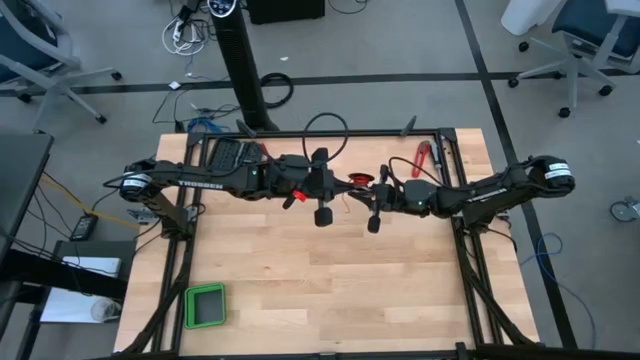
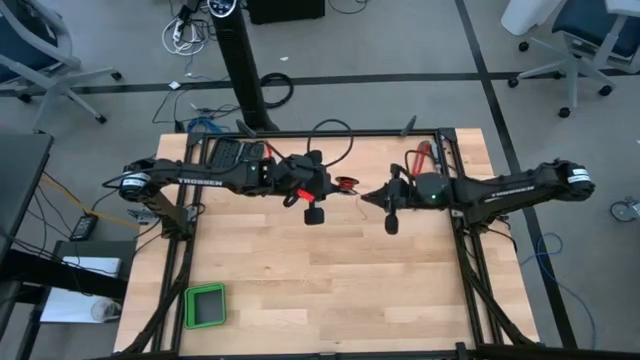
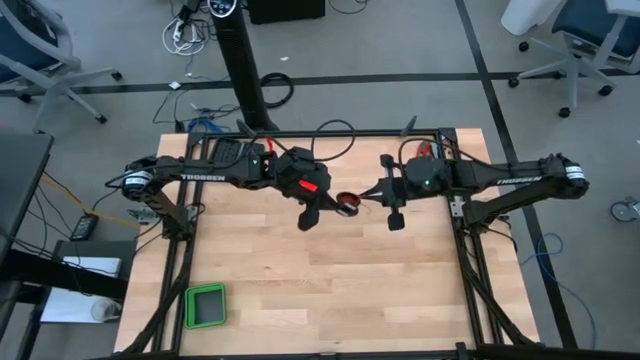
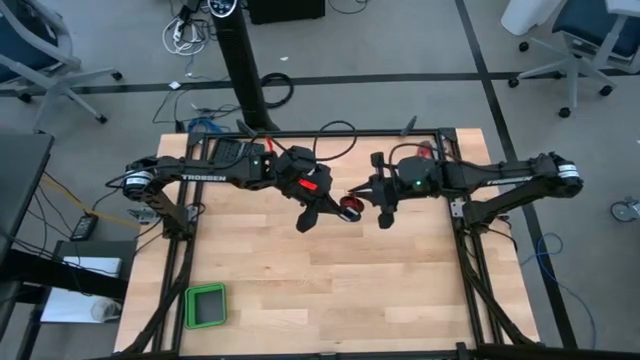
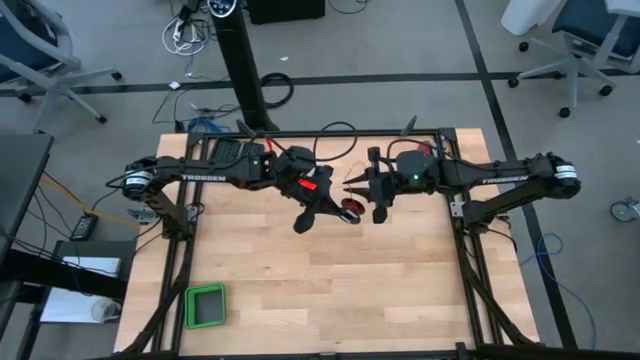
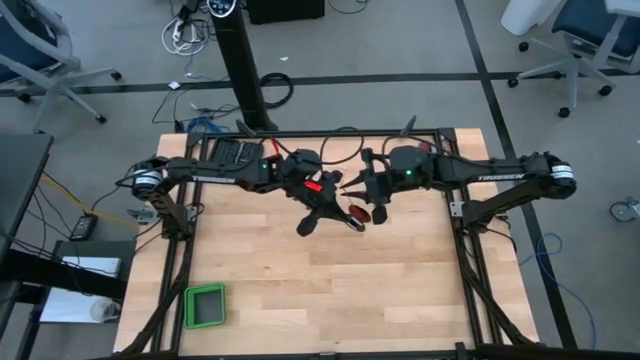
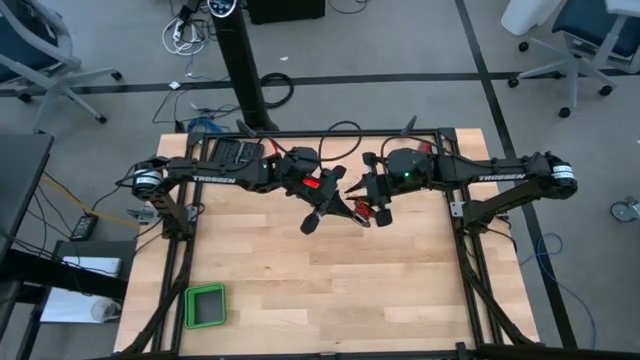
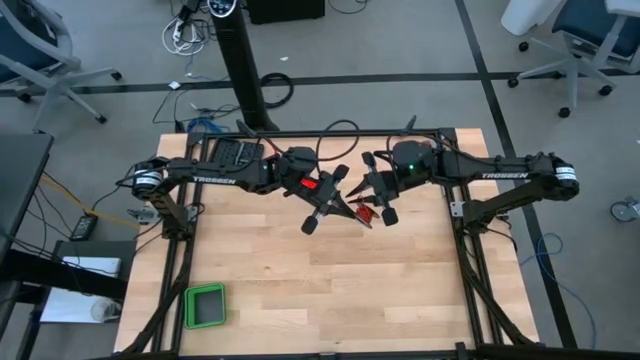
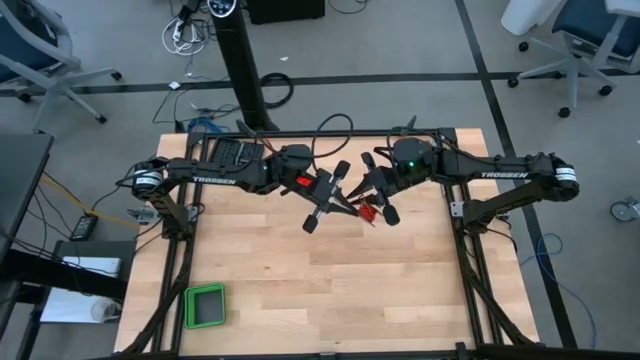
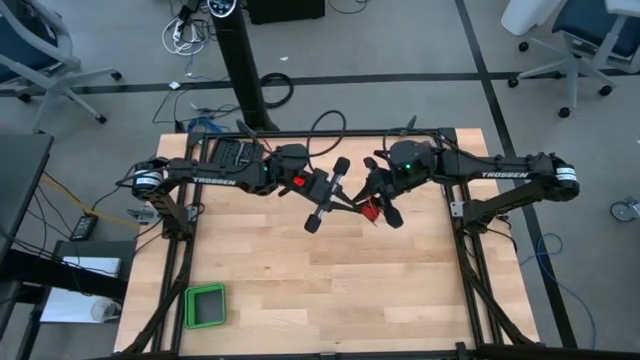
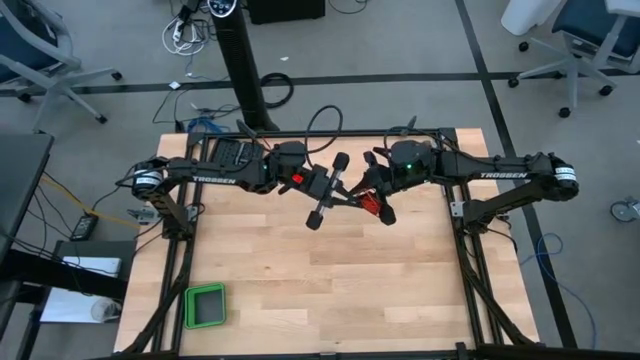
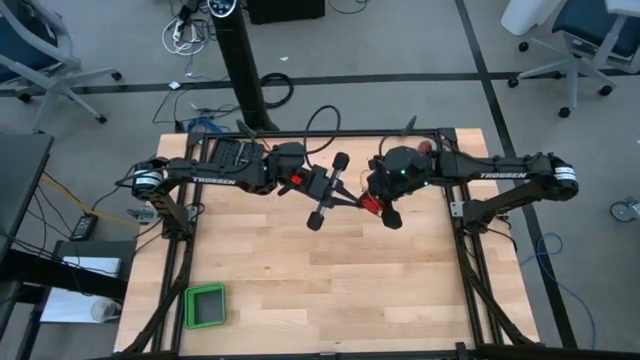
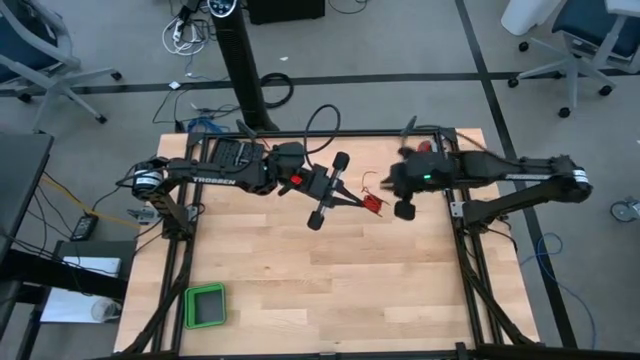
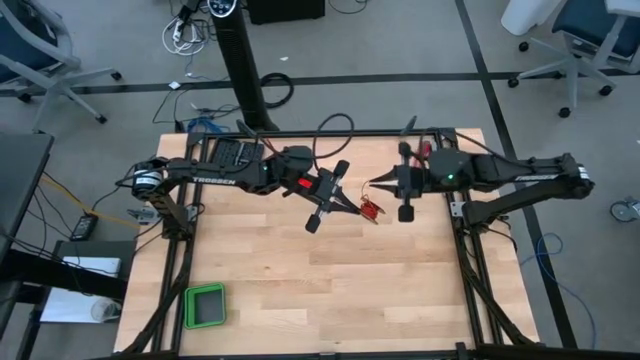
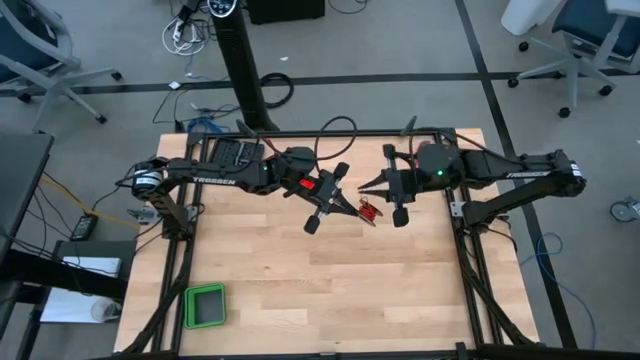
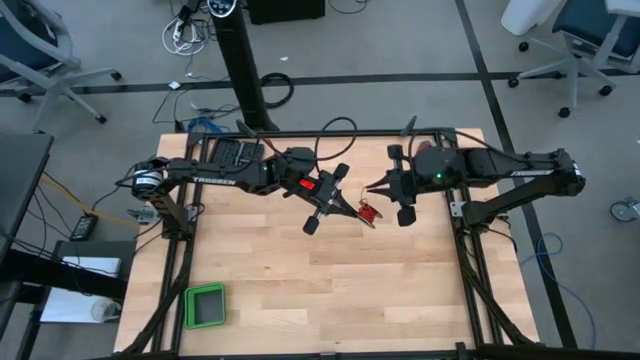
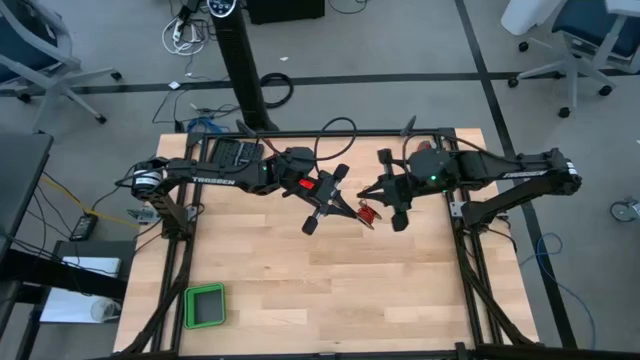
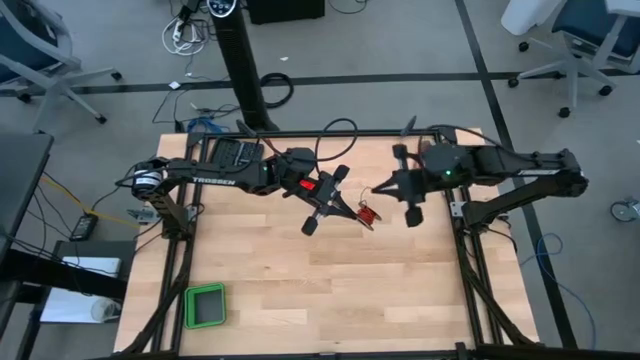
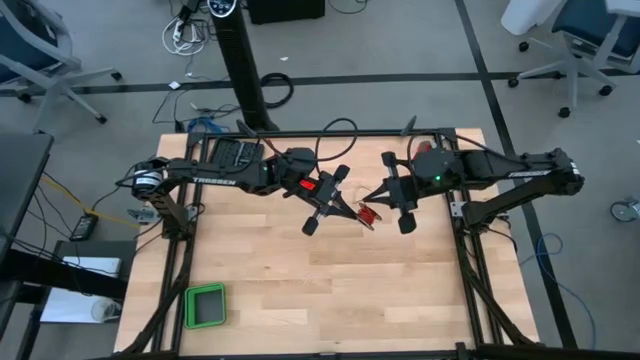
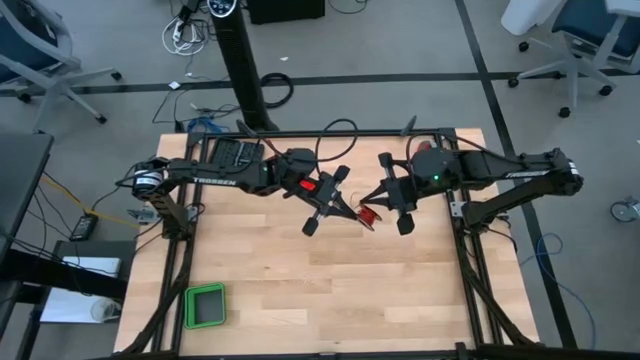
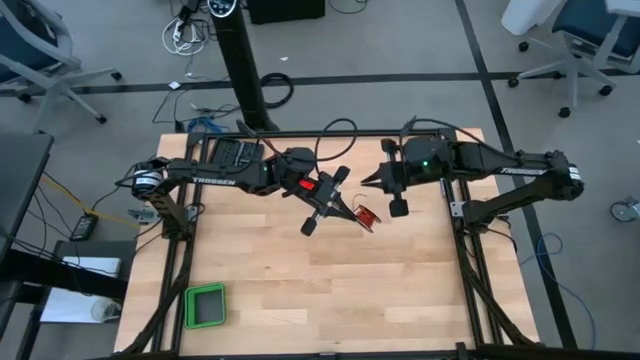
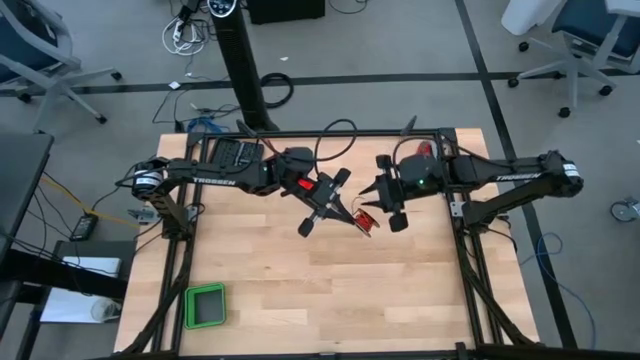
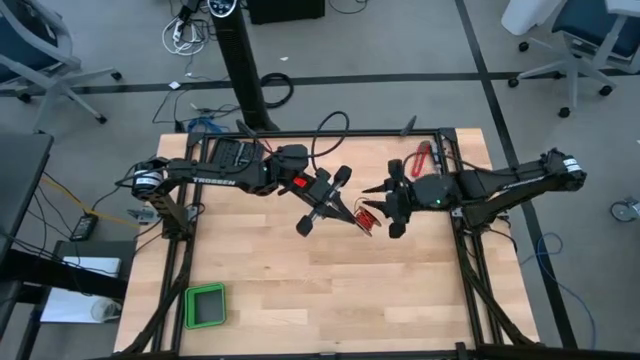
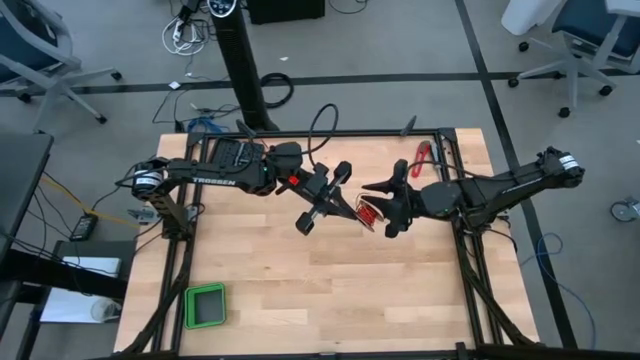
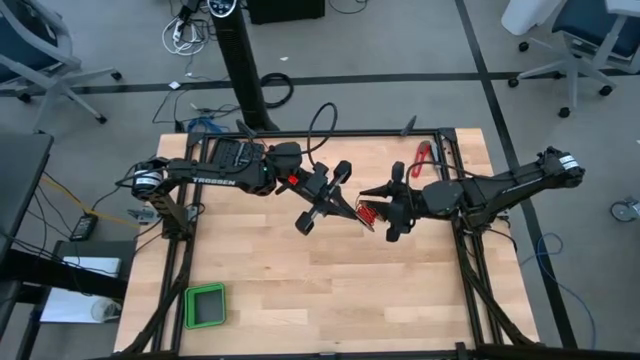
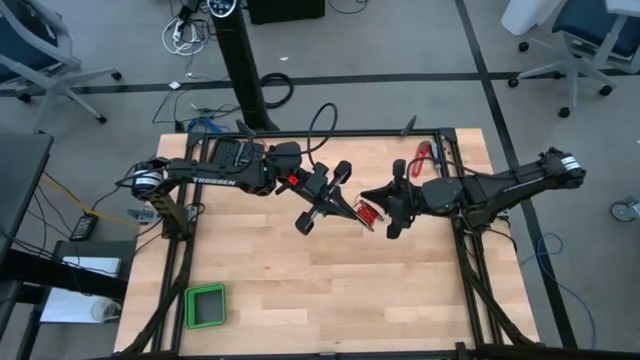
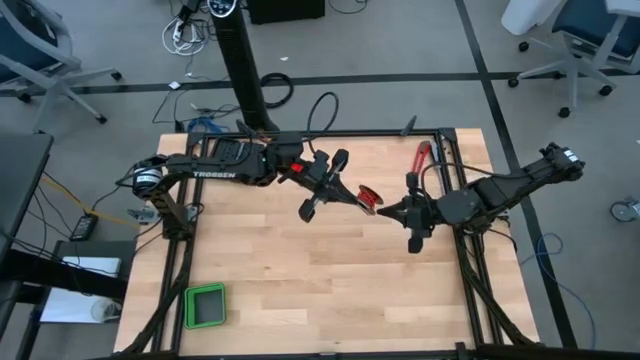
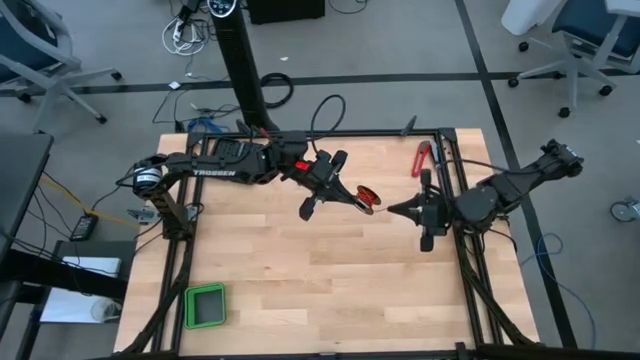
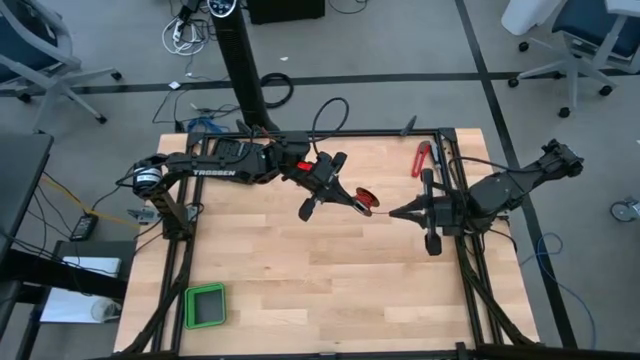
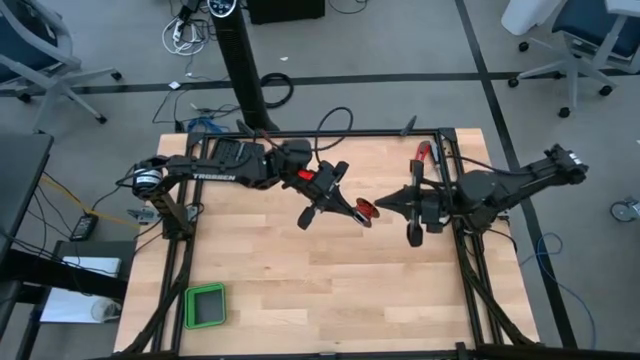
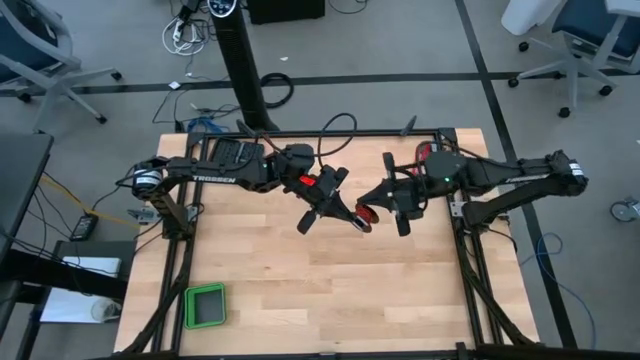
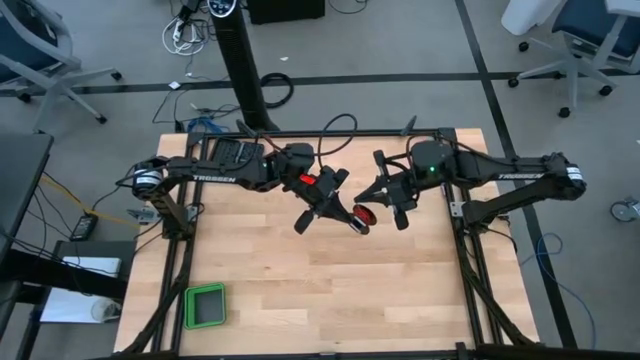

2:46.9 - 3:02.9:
Task: Coil cords
Coil the red wire onto the black spool

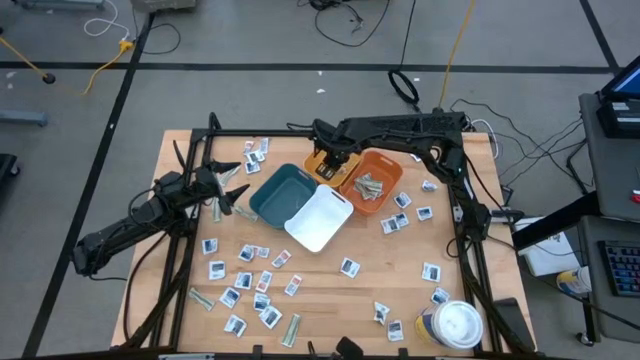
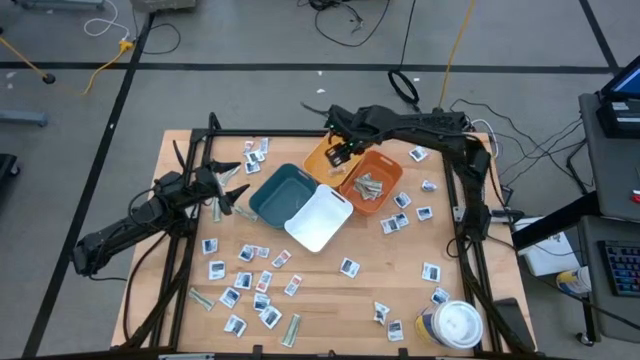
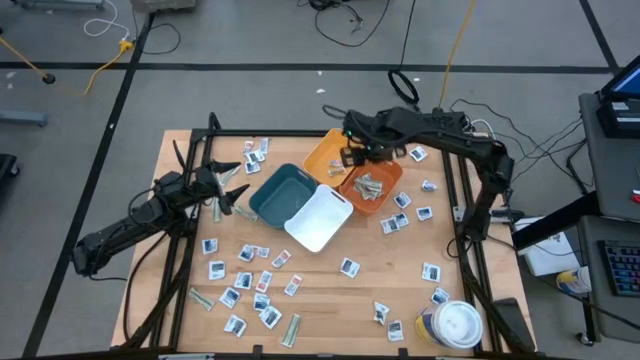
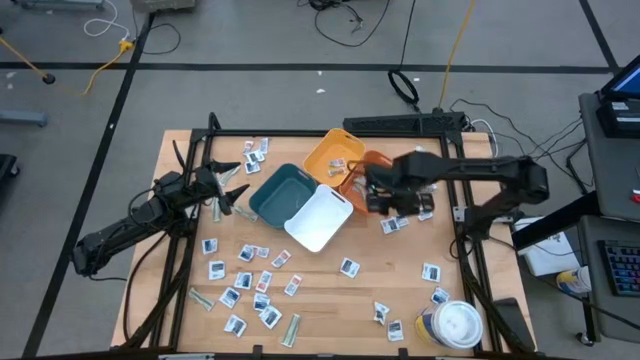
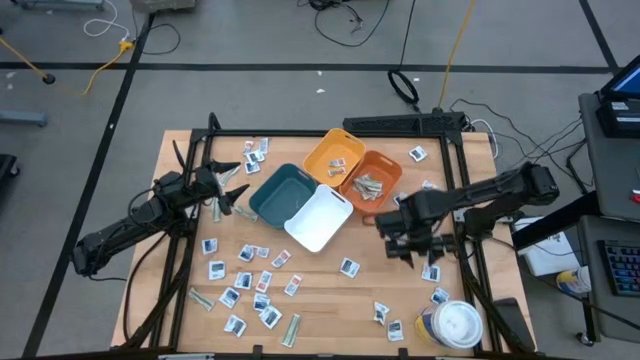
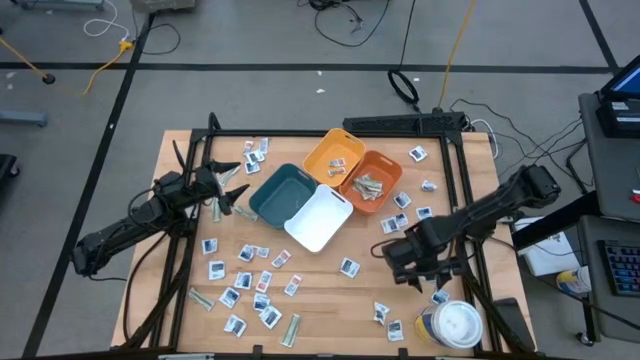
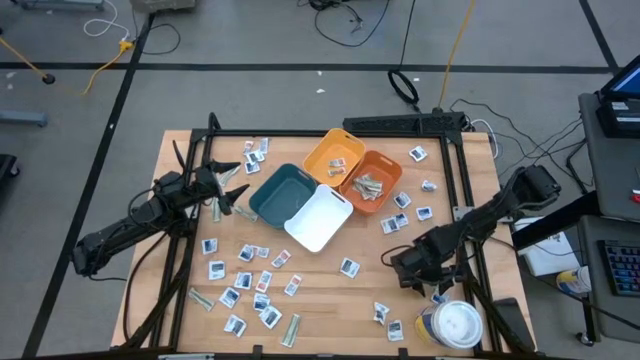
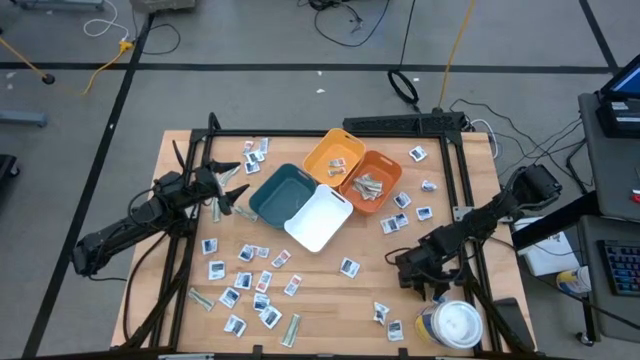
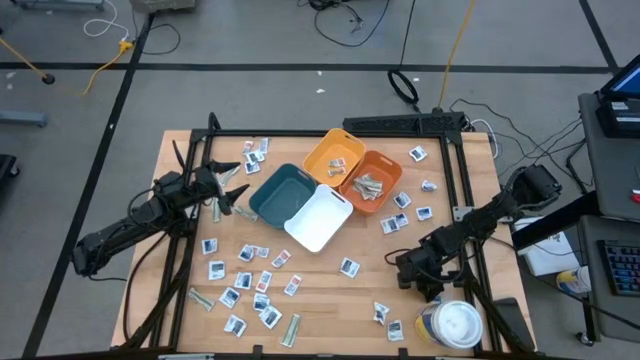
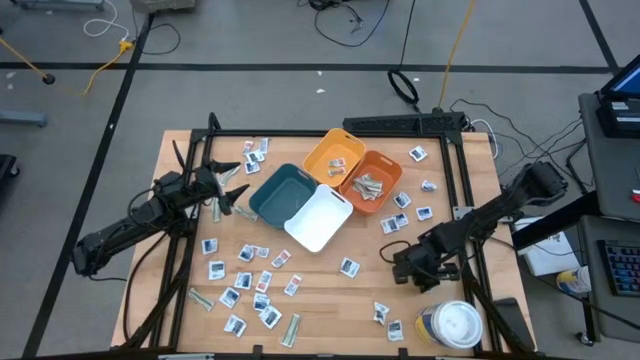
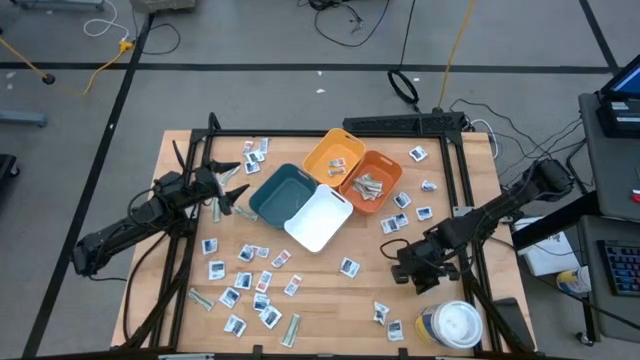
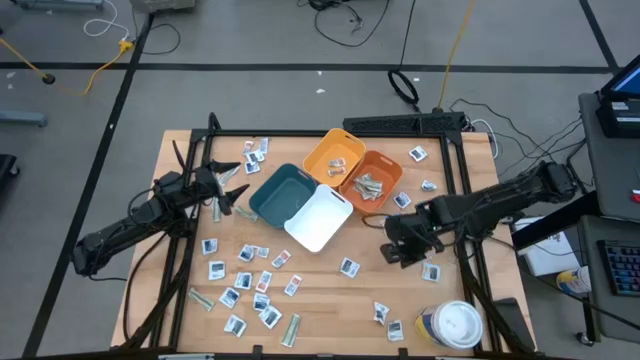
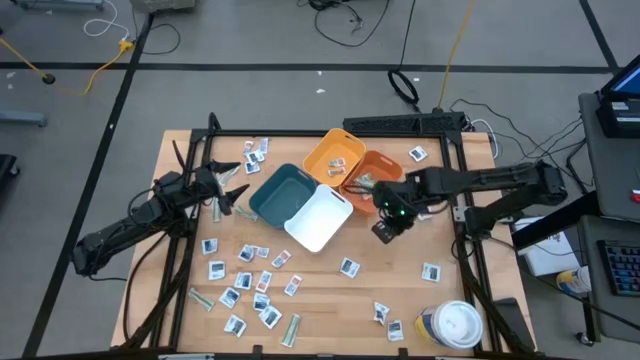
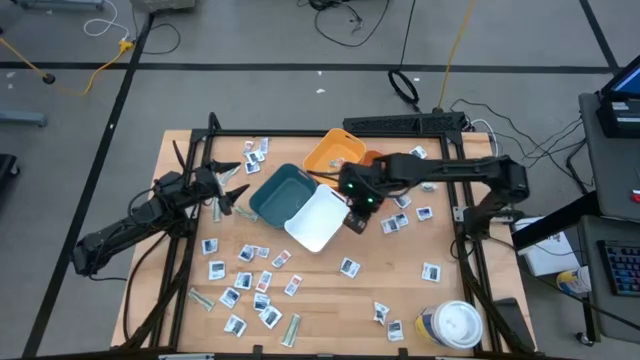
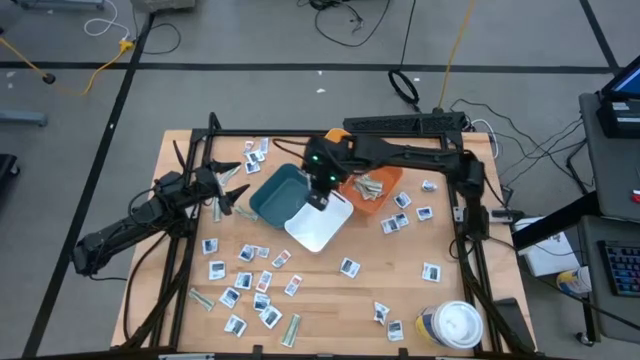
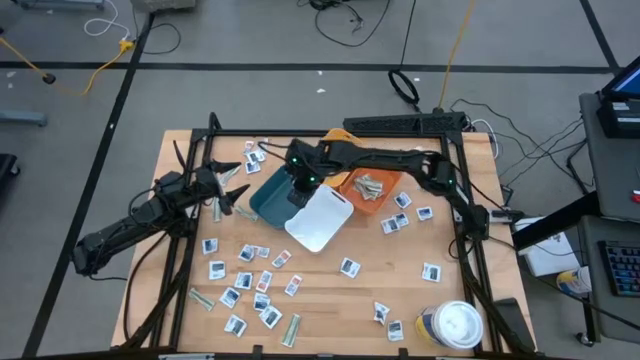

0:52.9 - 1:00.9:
Task: Pick & Place First Aid Supplies
Put the blue alcohol pad into the blue bin
